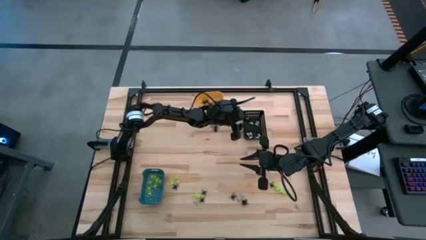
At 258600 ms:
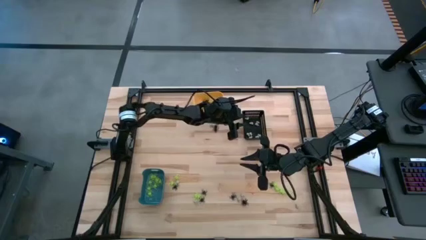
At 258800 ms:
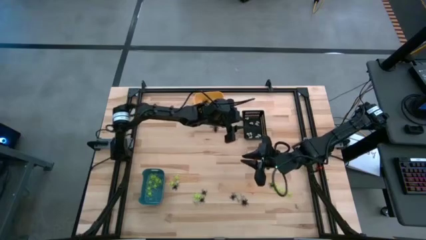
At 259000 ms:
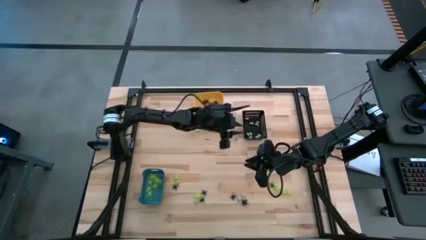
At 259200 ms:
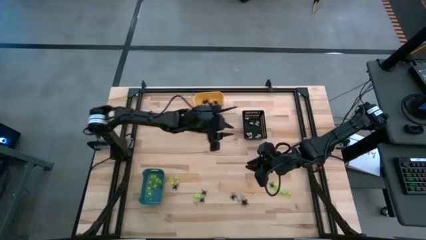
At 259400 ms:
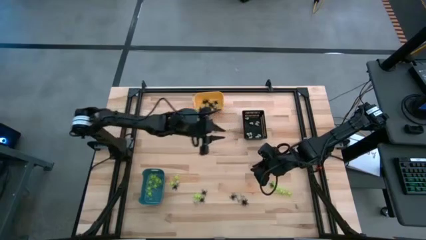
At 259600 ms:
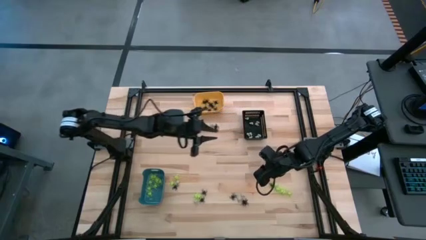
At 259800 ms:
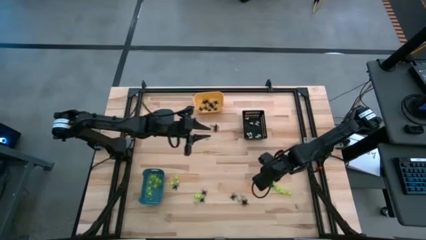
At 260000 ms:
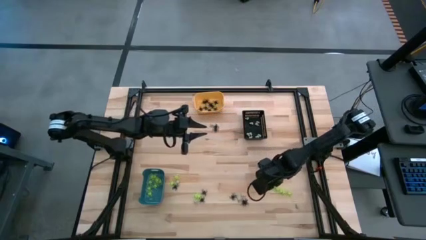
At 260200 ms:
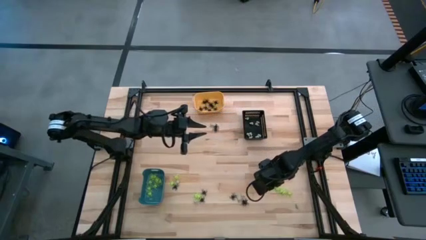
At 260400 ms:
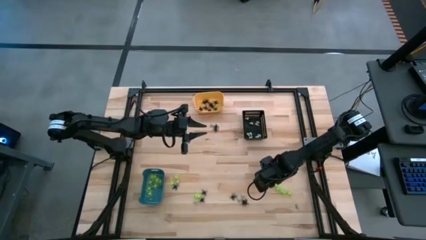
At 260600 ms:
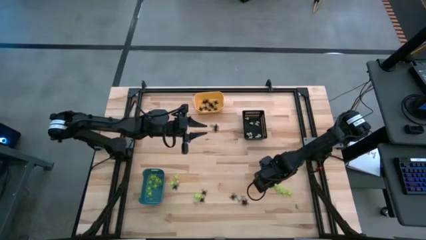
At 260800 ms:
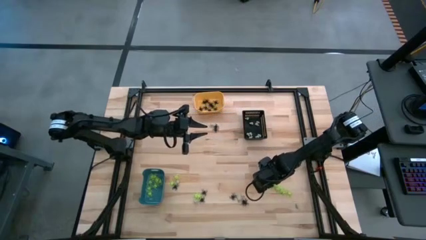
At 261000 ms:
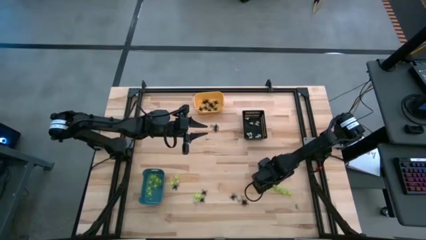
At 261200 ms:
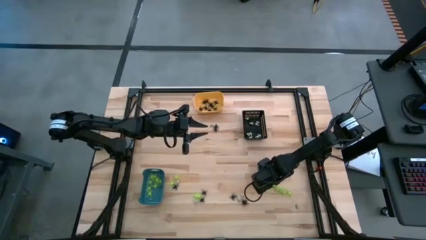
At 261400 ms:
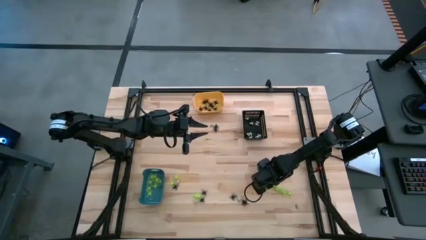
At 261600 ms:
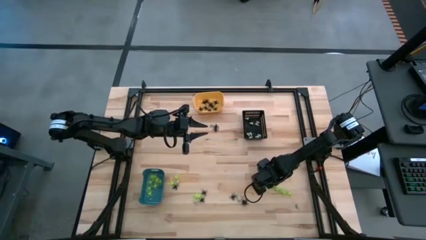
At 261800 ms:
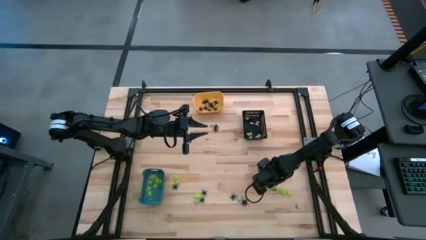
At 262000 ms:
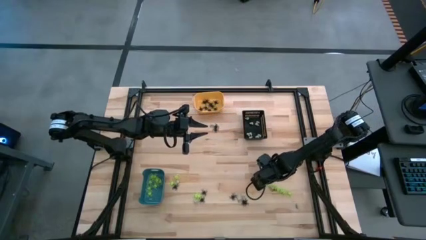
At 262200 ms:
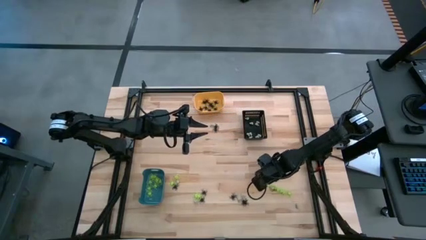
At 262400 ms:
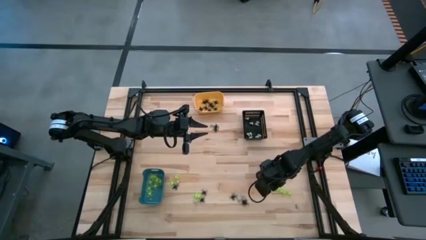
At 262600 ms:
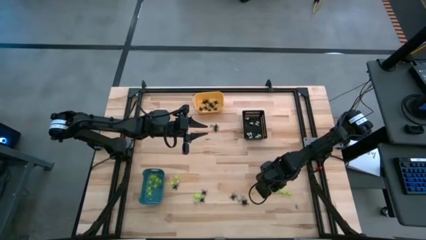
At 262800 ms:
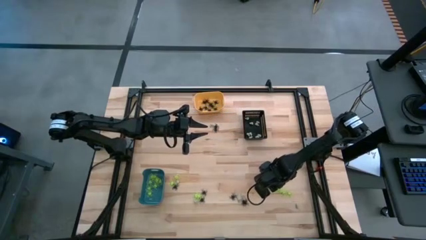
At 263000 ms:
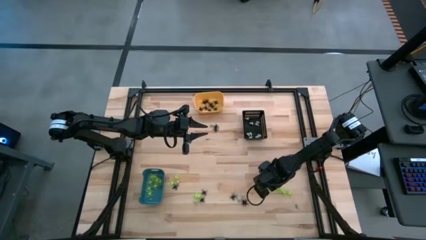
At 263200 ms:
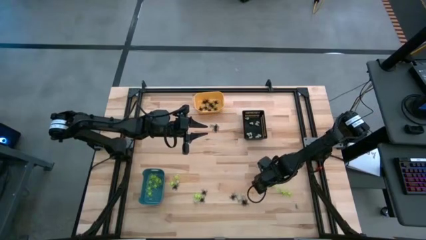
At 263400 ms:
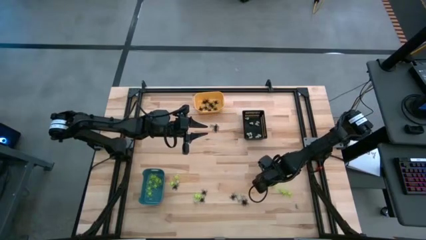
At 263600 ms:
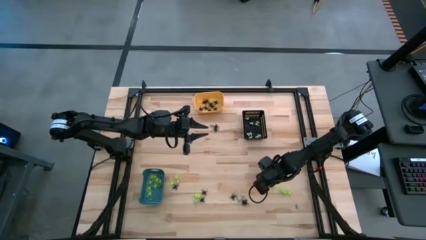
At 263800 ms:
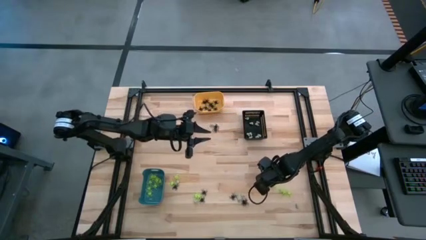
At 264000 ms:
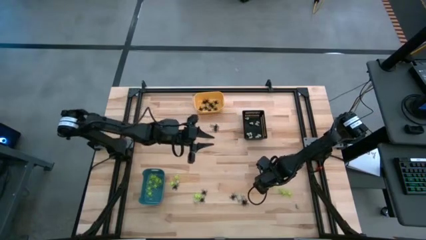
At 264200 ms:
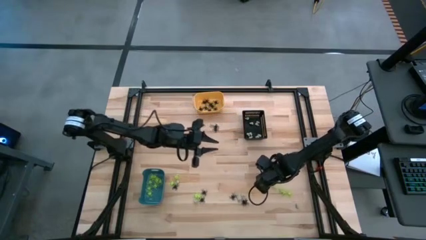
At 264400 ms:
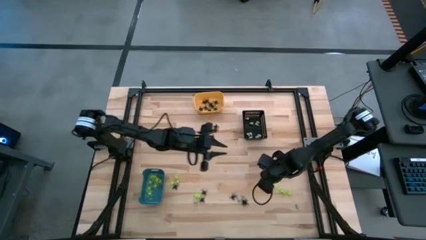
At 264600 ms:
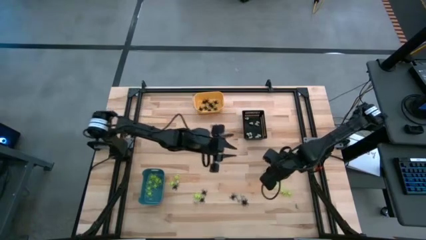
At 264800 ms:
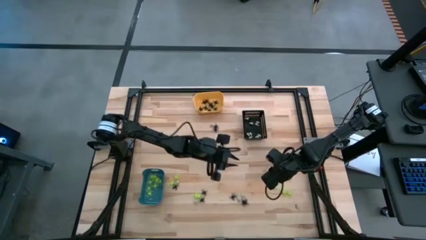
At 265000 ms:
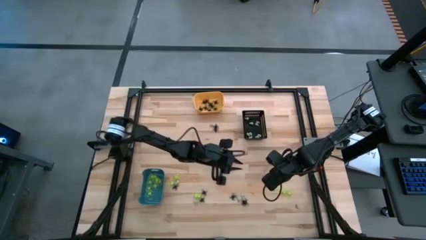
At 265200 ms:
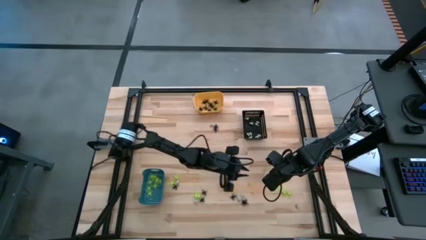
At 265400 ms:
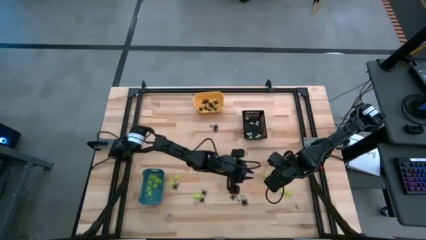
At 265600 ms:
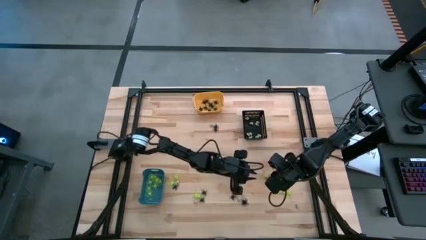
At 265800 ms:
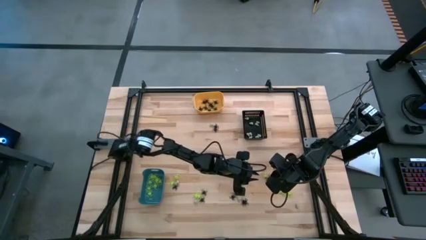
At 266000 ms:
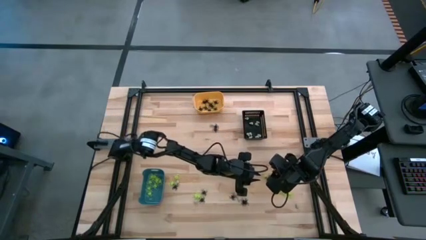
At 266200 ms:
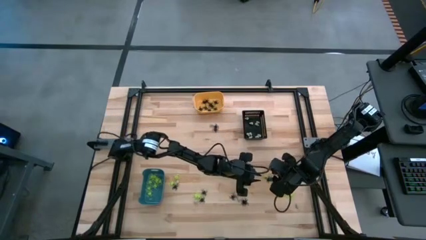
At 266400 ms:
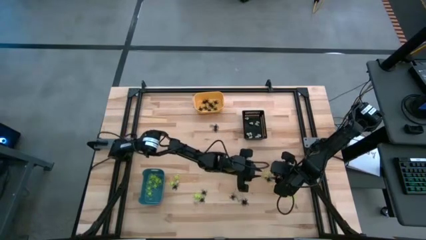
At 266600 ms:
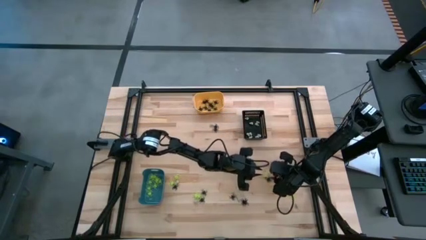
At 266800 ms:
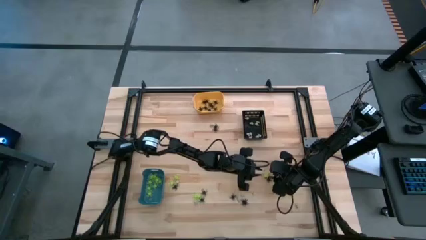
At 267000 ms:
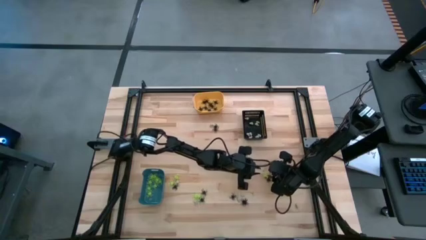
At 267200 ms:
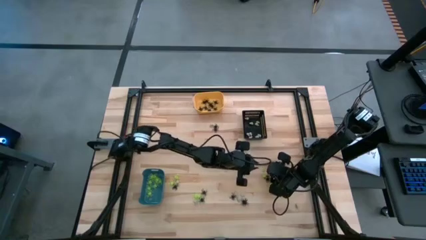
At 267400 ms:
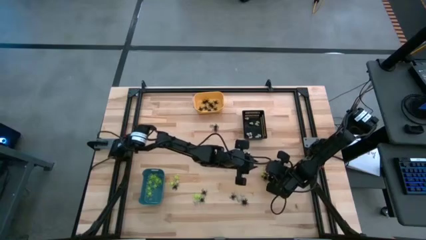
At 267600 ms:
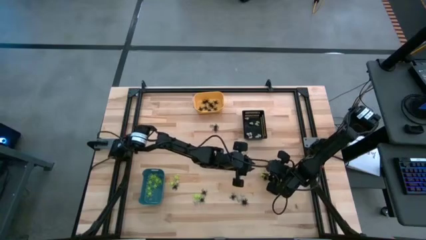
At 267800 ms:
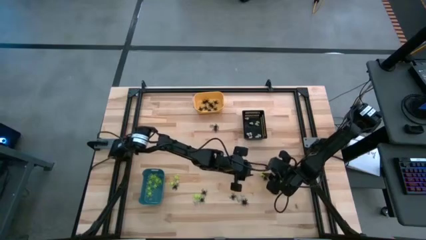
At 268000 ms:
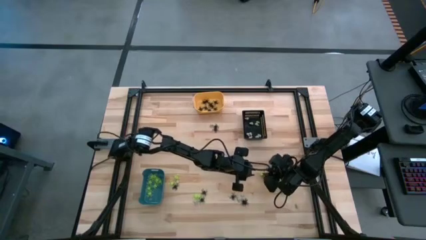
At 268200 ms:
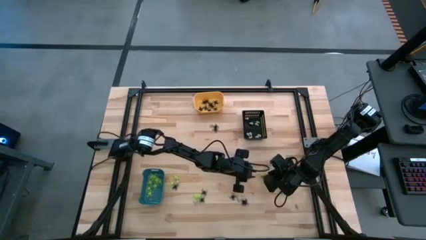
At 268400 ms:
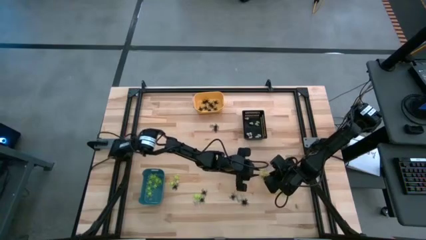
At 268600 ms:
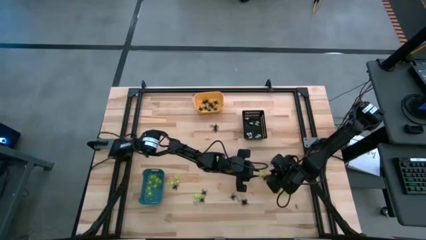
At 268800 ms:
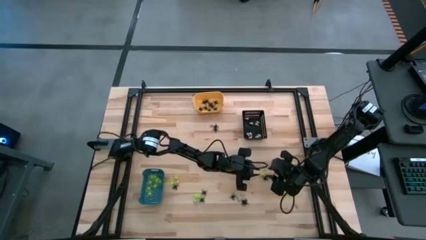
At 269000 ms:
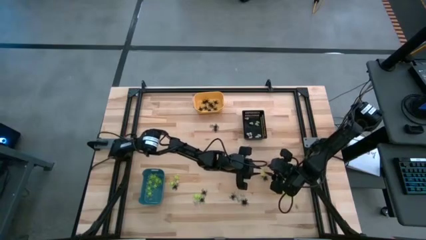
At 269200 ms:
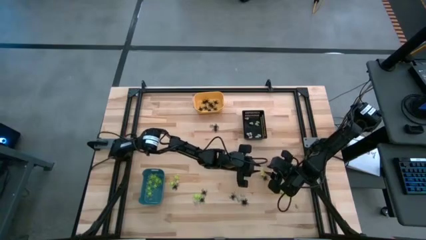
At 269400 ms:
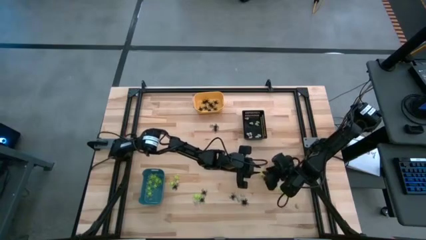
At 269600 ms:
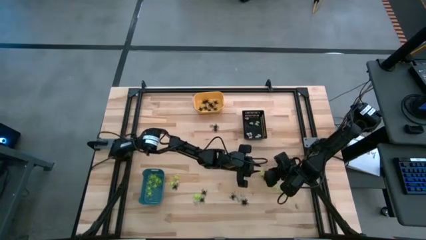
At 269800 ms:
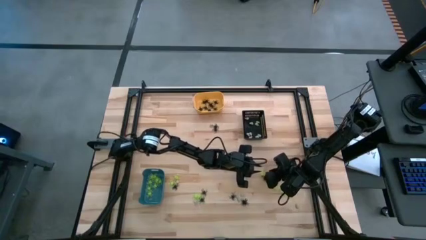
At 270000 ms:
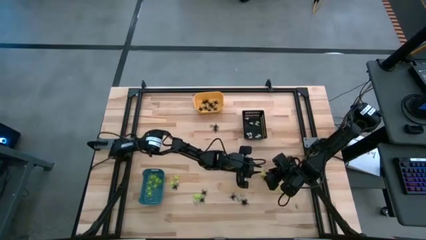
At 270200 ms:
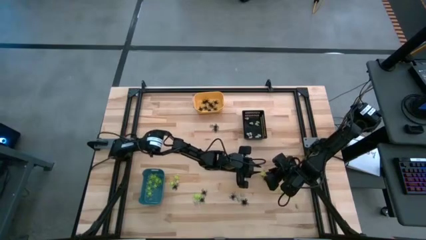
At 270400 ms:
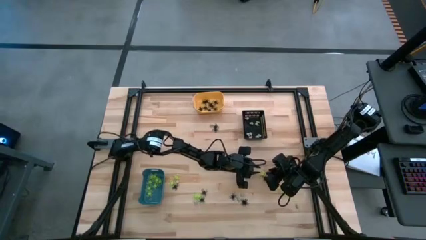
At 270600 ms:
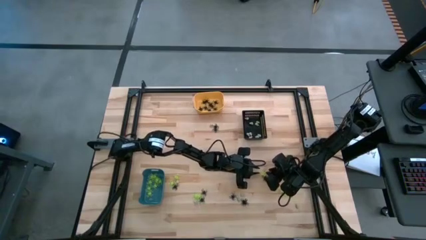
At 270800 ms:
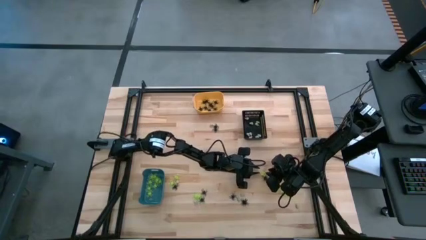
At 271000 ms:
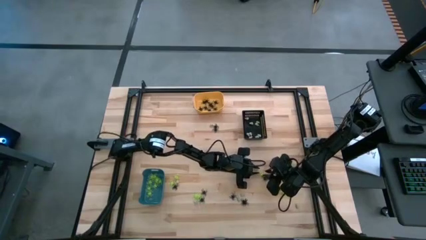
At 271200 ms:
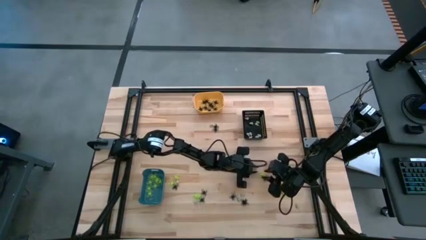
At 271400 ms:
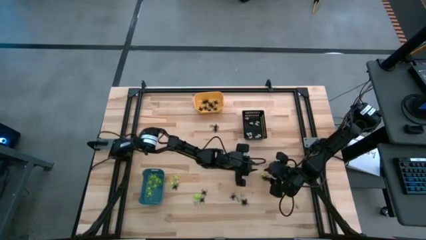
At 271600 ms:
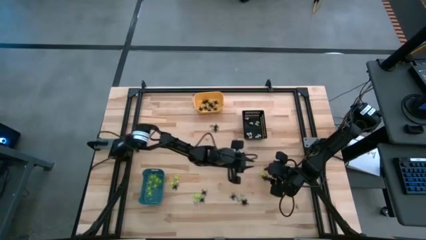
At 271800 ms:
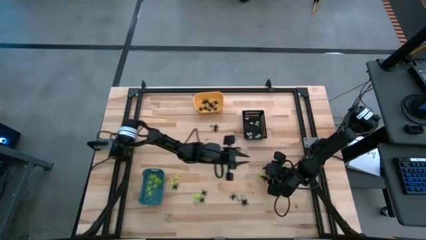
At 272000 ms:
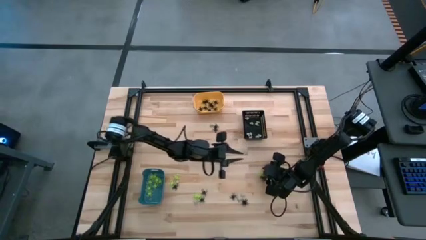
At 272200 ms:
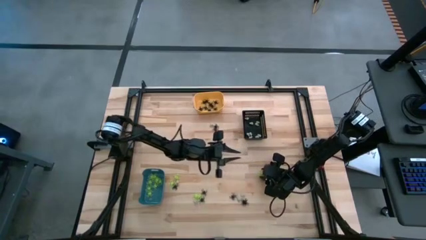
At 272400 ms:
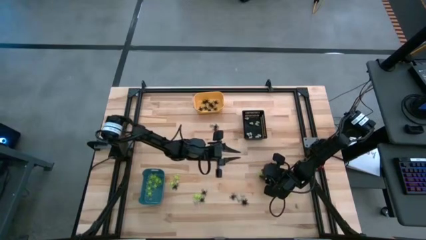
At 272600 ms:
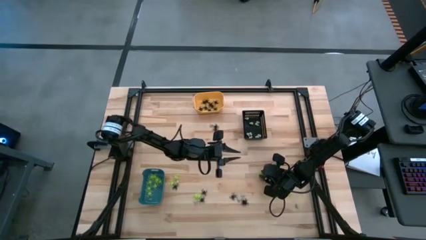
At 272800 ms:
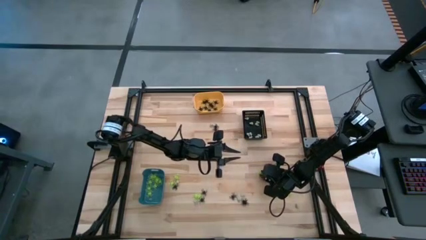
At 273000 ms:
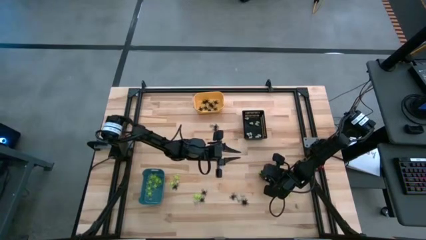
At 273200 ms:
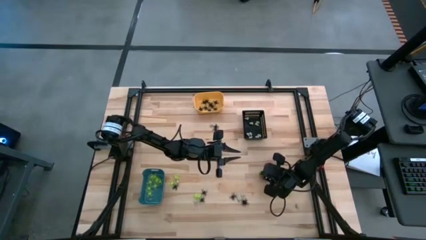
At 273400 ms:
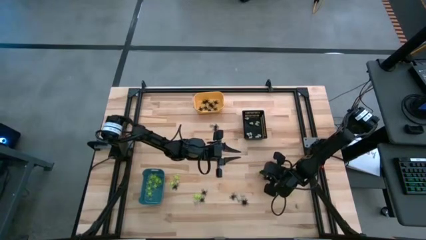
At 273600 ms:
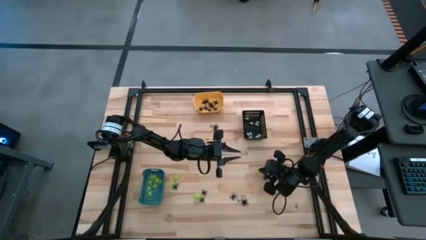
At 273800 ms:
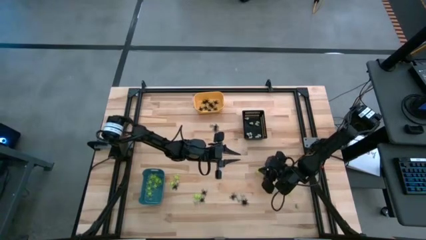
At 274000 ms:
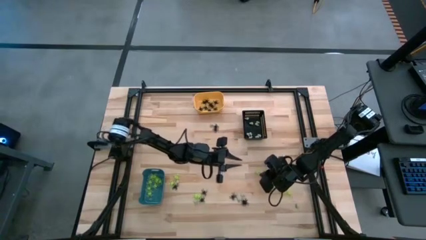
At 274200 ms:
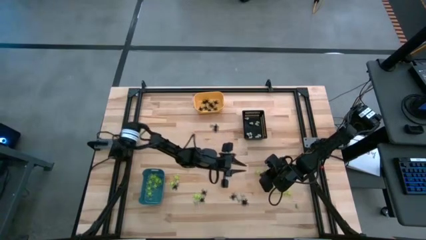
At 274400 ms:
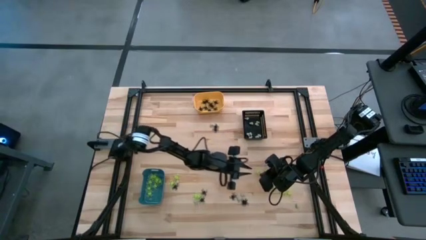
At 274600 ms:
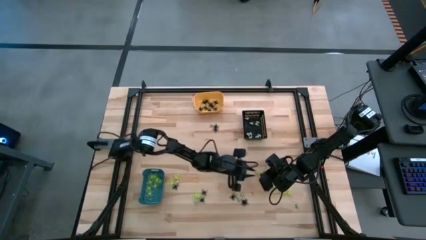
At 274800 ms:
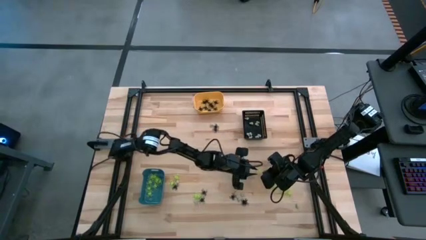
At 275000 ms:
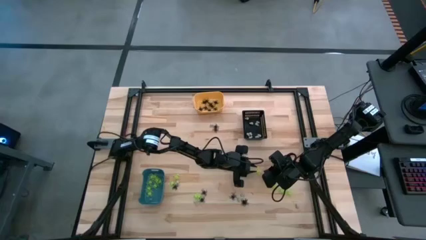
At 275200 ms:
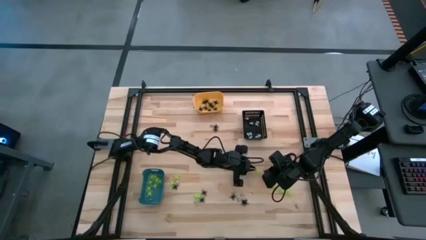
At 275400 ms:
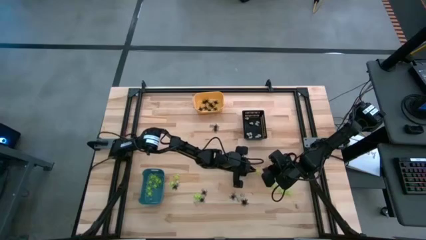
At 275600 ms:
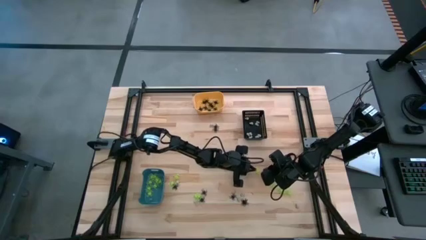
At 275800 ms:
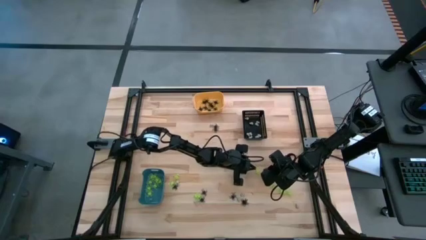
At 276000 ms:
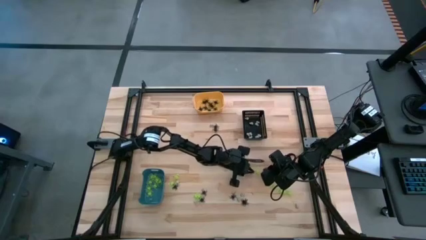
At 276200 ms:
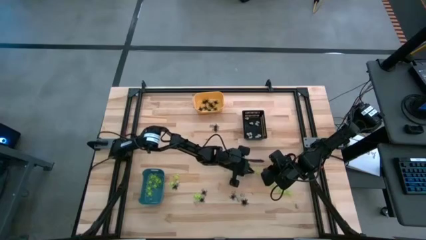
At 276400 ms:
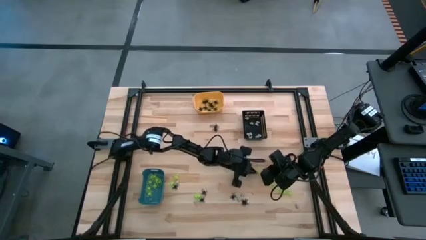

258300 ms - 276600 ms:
Task: Sort Halloween decoration
Put the green spider toy into the blue bin
